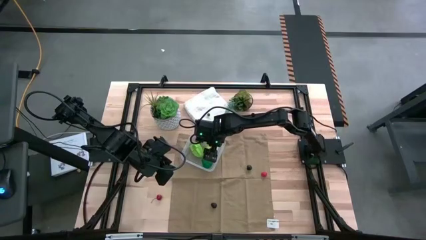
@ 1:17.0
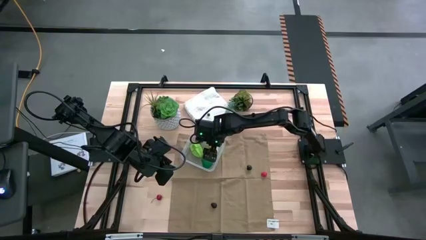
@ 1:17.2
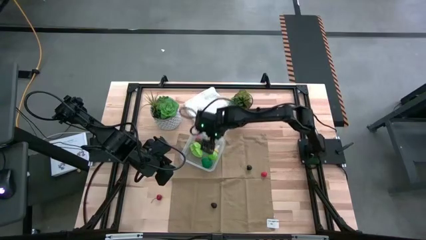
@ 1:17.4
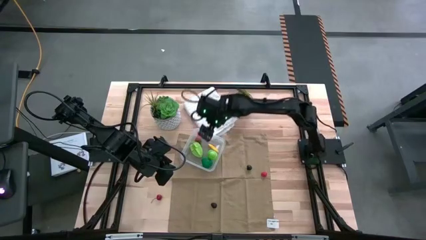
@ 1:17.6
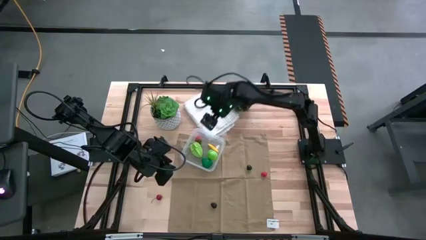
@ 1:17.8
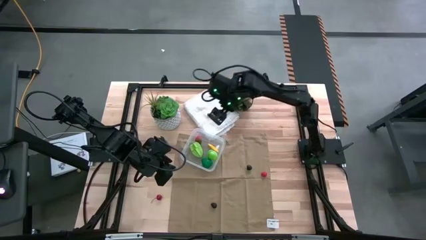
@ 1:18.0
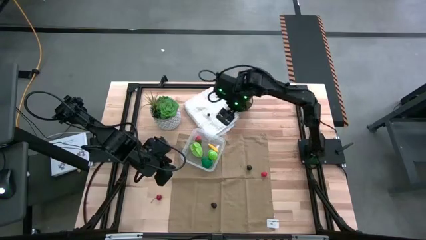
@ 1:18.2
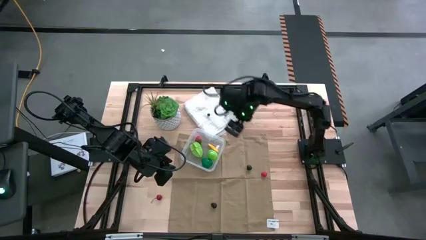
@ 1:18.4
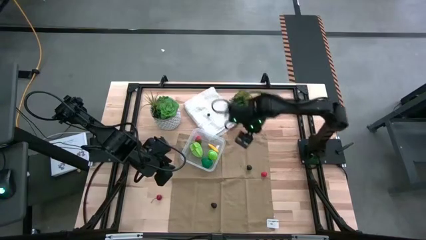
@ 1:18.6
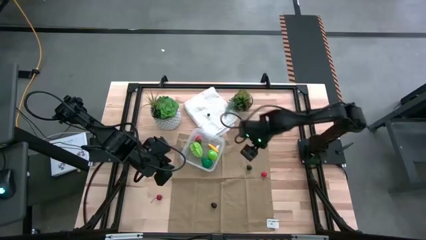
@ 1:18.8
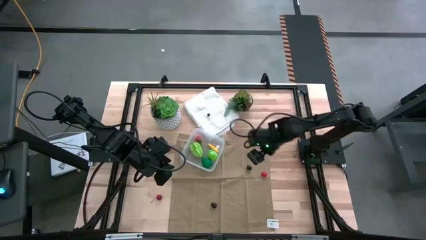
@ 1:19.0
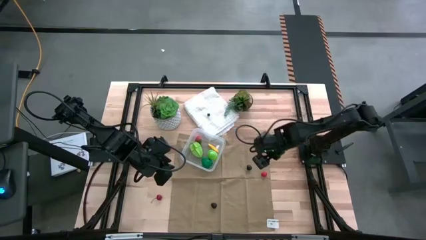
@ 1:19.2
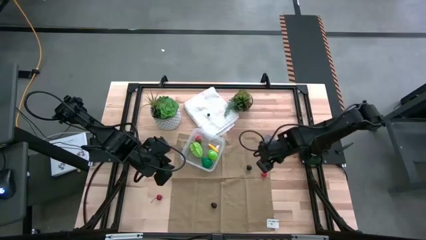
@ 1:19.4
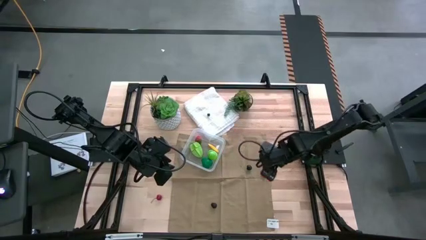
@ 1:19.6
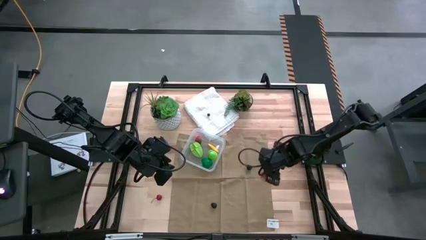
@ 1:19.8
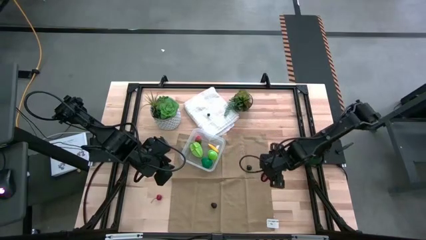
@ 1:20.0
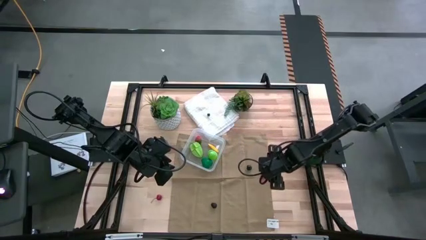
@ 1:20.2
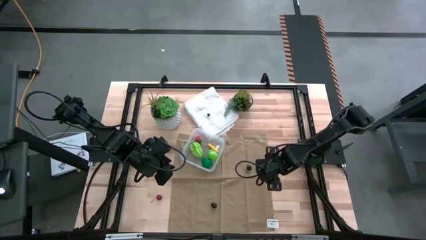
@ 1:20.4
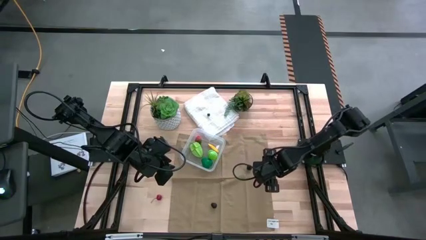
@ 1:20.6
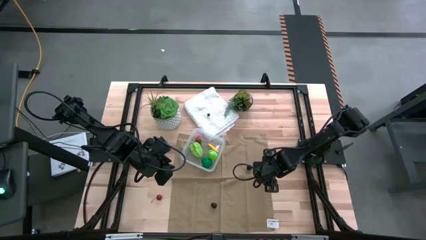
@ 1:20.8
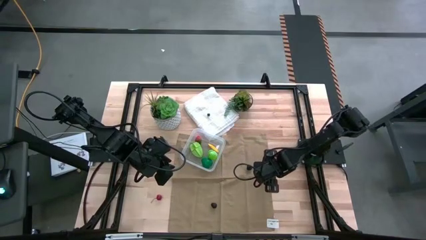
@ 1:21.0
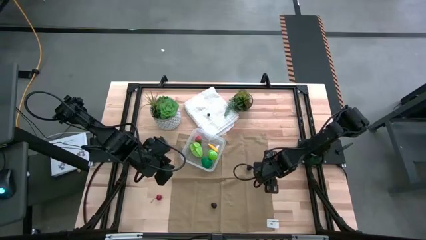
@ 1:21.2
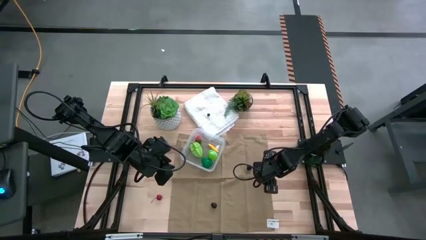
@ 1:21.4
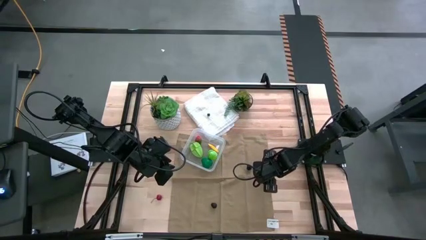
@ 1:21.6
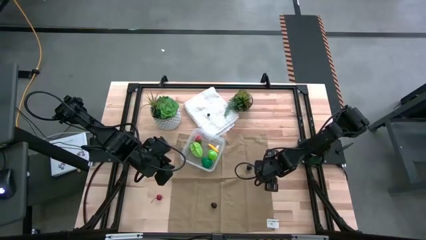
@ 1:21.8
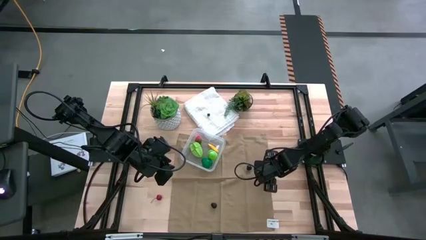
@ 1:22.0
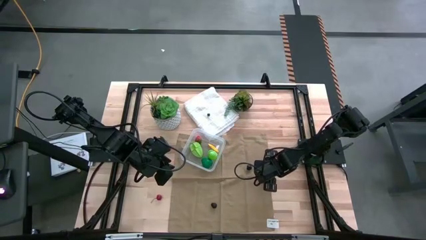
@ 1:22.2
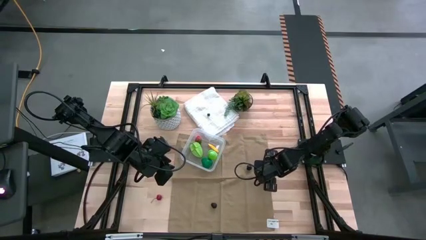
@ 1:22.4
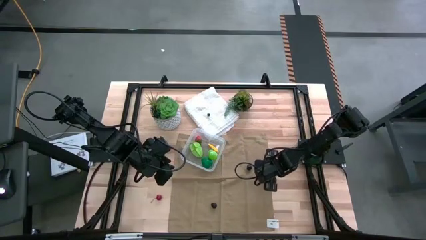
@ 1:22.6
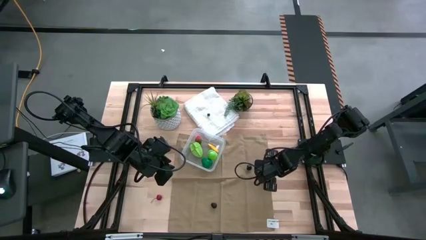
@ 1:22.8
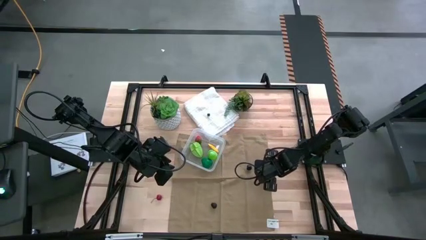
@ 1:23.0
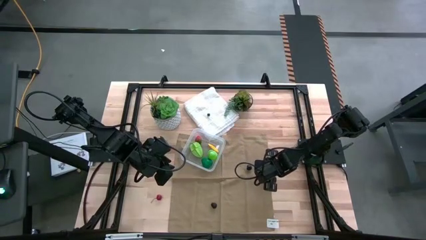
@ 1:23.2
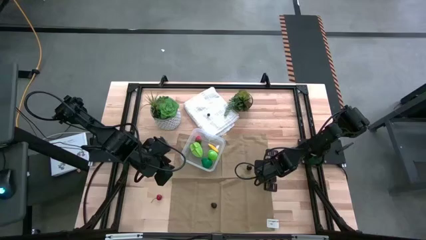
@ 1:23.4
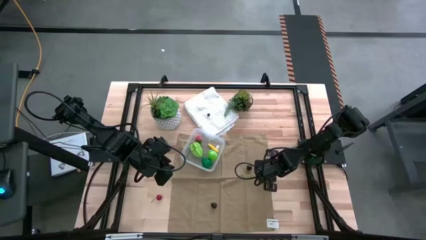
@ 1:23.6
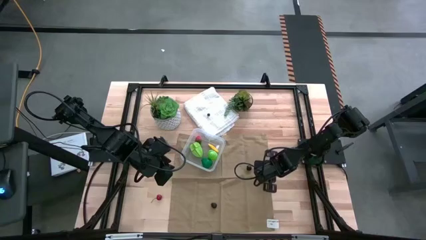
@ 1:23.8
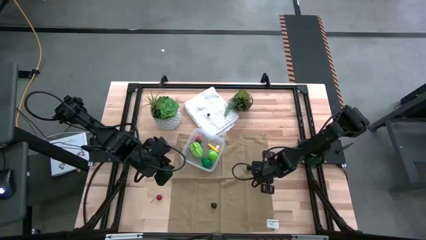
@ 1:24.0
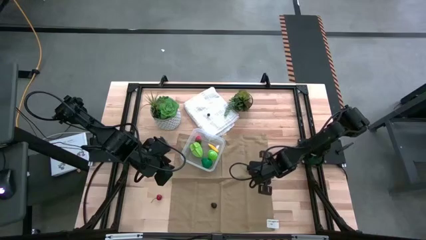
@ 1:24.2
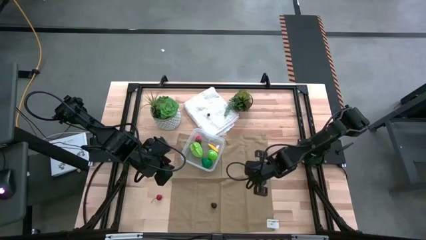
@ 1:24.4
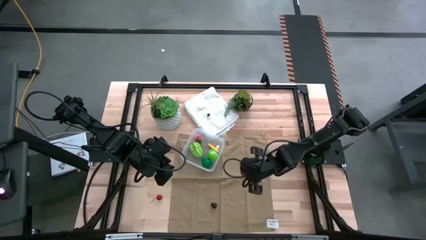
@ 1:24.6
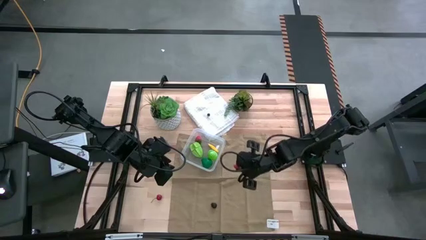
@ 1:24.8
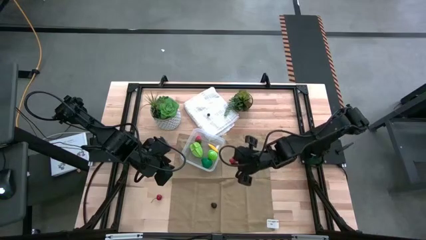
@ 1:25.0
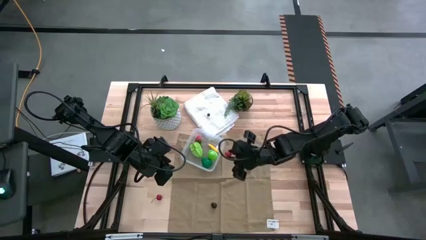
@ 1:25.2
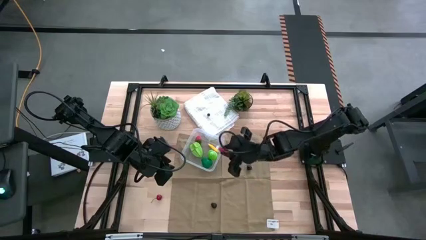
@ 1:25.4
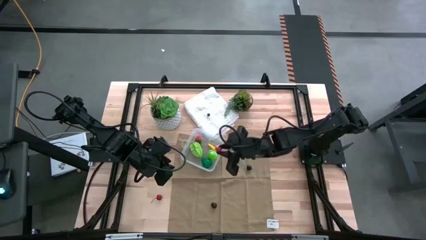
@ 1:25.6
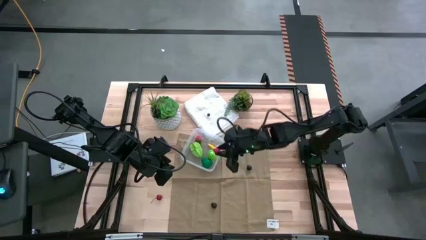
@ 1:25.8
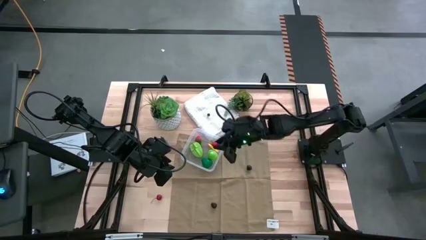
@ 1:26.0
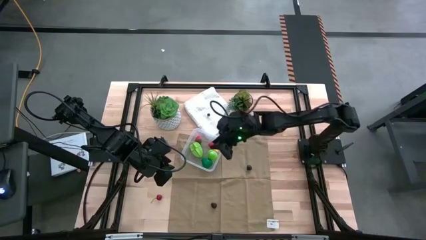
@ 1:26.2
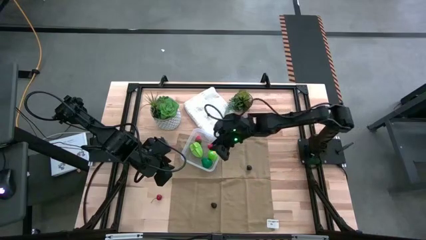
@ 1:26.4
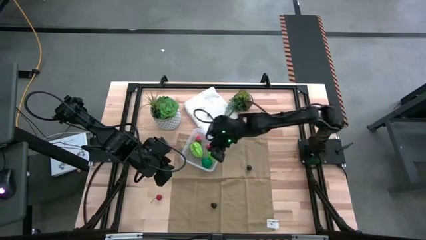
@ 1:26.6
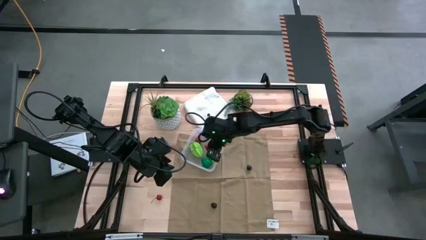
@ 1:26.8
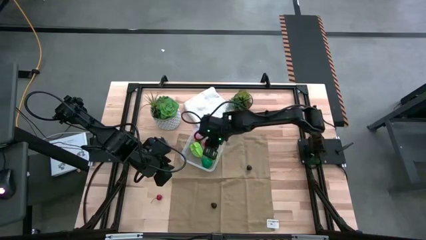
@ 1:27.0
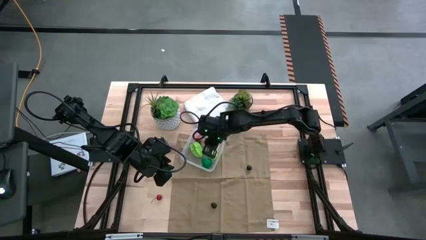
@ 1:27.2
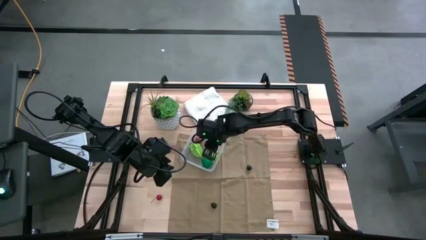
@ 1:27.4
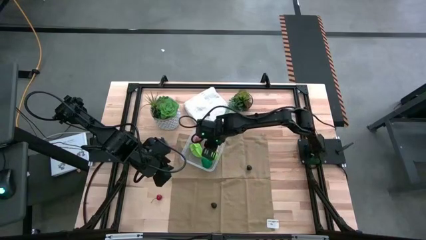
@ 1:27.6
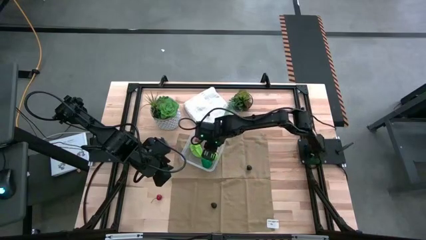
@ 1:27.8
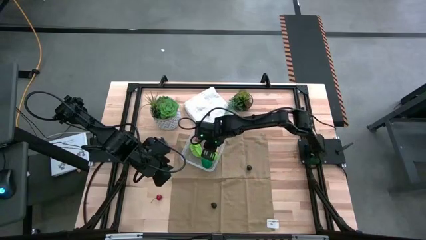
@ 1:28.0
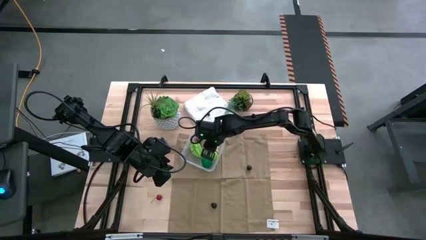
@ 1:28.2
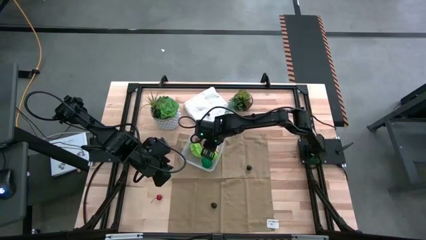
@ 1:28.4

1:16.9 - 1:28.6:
Task: Pick and placing Produce into tupperware
Put the red raspberry into transparent bin
